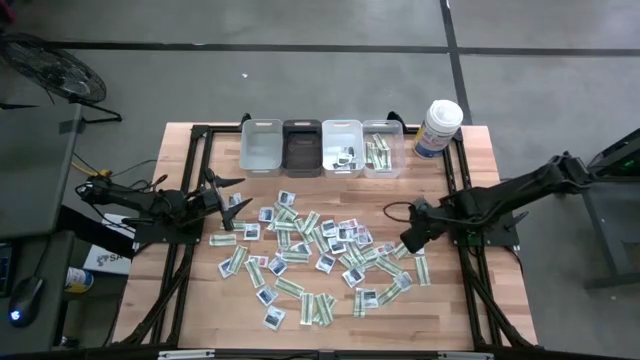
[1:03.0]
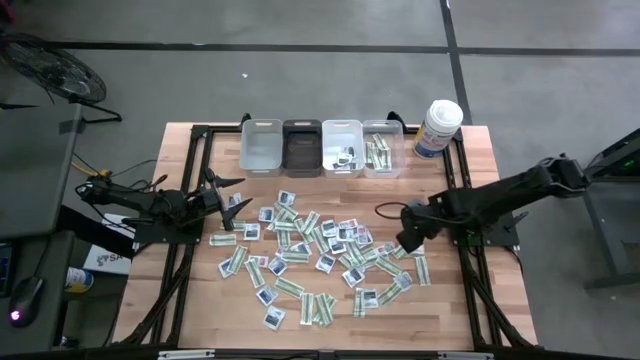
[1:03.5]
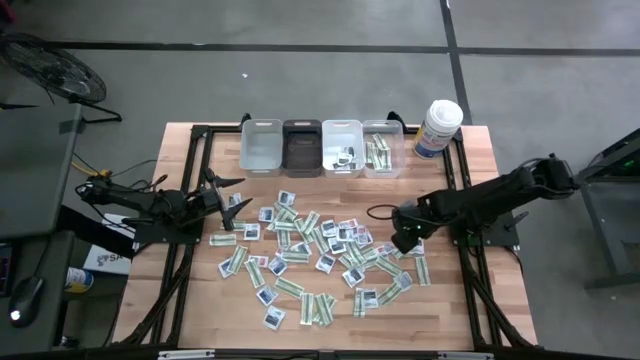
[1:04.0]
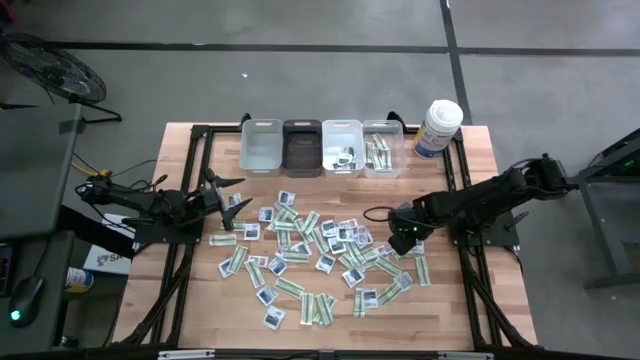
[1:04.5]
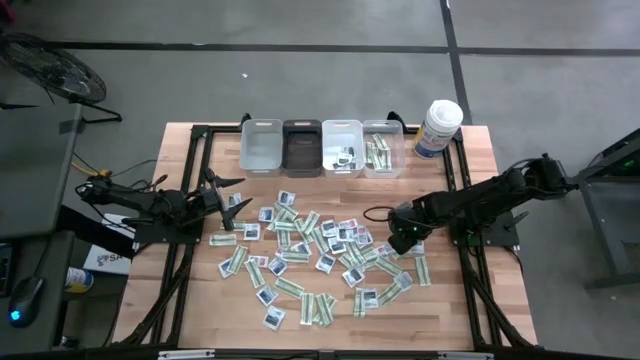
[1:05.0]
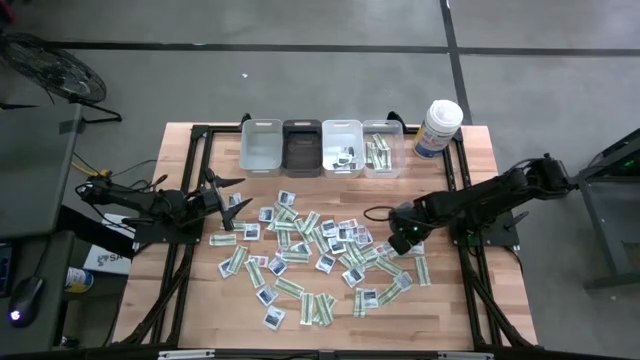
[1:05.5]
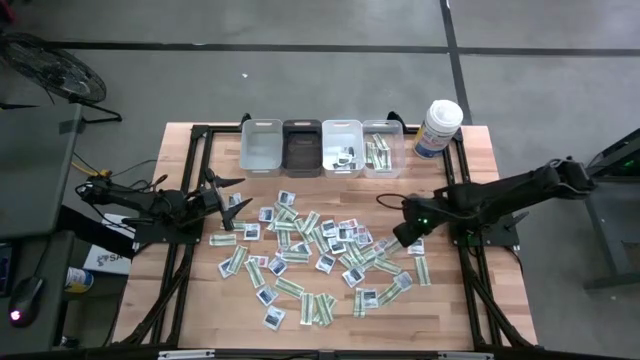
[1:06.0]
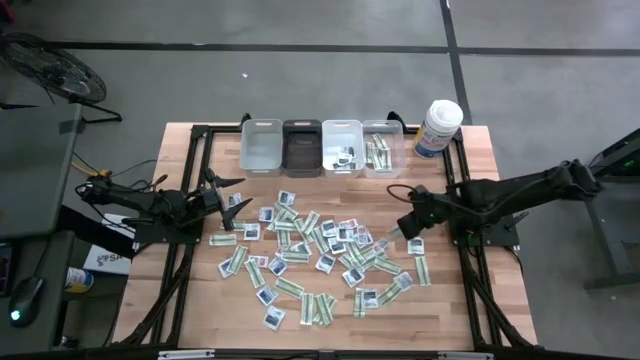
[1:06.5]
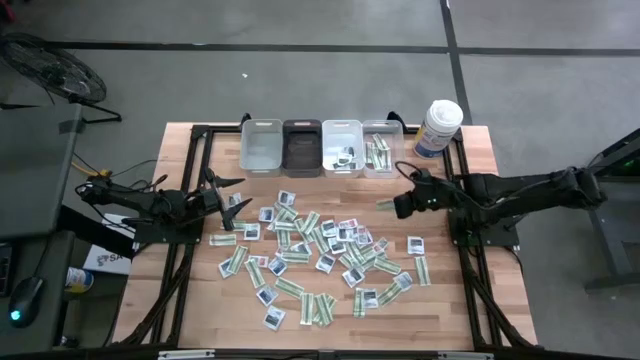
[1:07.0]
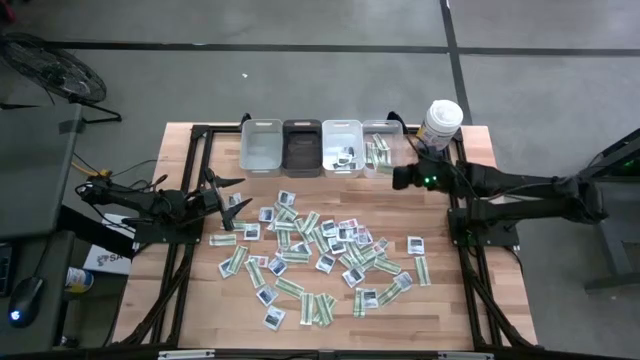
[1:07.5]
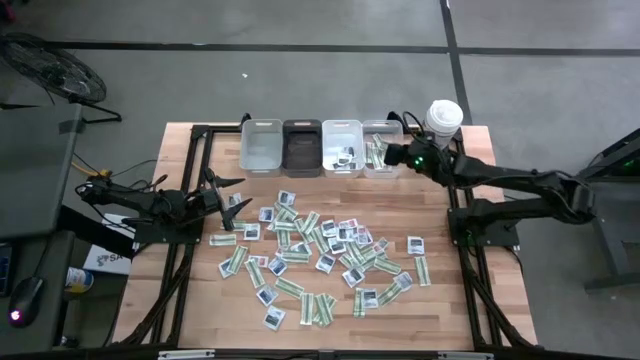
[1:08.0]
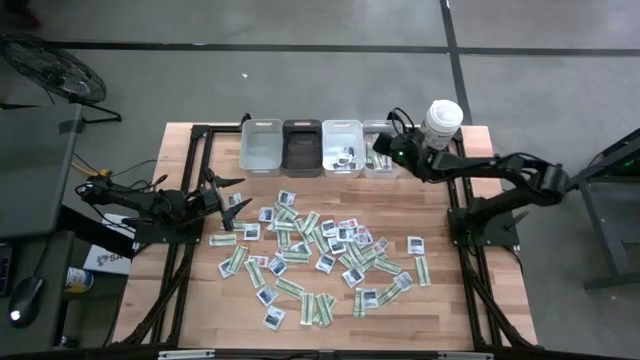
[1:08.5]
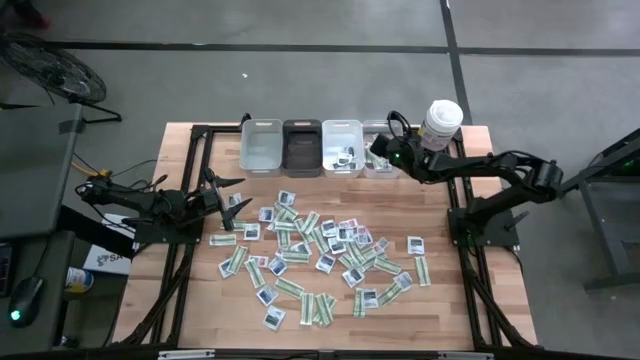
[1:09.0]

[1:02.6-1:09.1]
Task: Pick & Place First Aid Supplies
Put the green bandage into the transparent bin

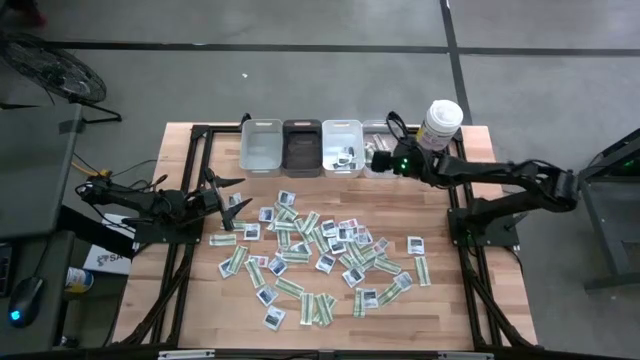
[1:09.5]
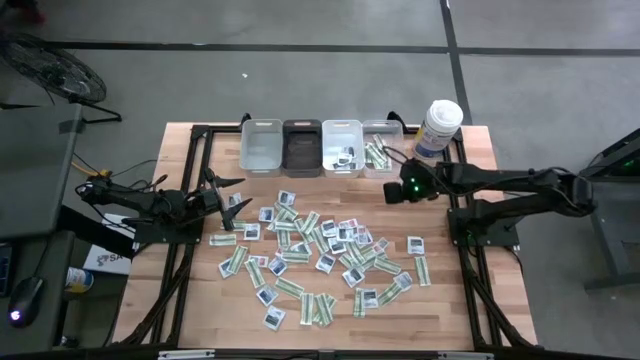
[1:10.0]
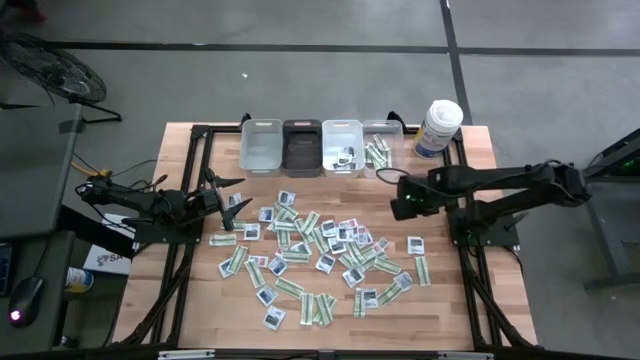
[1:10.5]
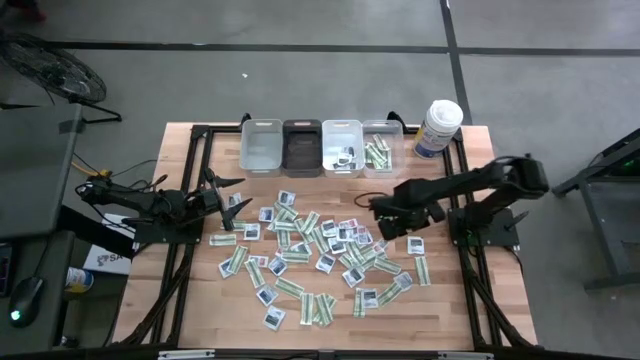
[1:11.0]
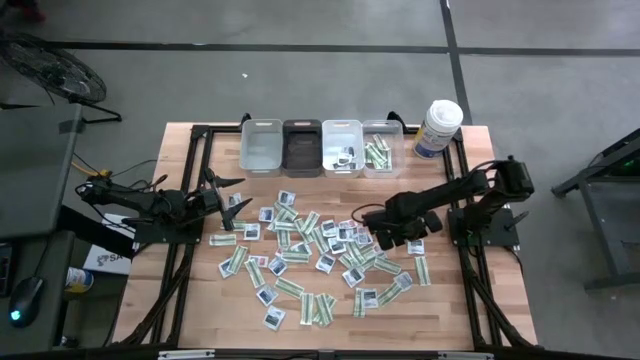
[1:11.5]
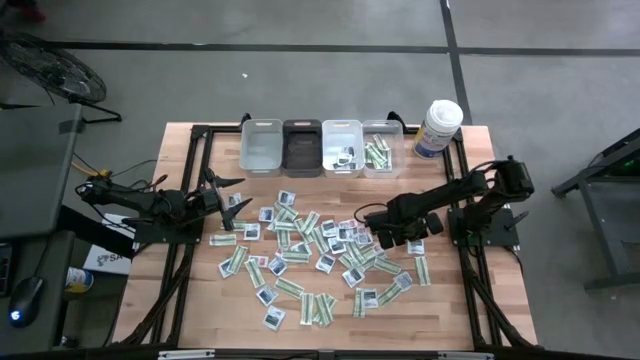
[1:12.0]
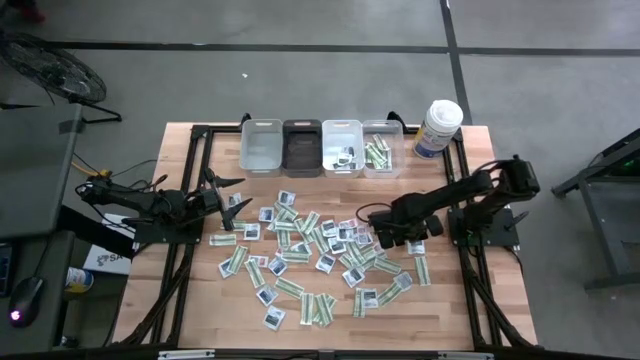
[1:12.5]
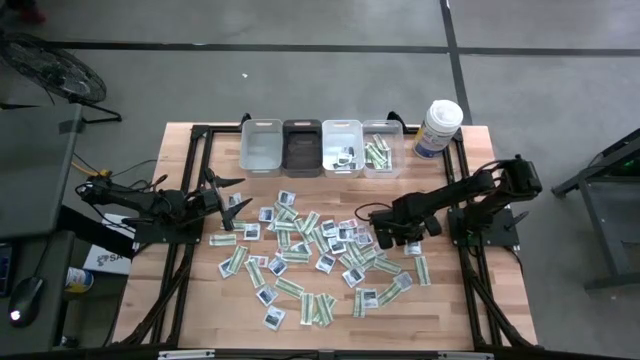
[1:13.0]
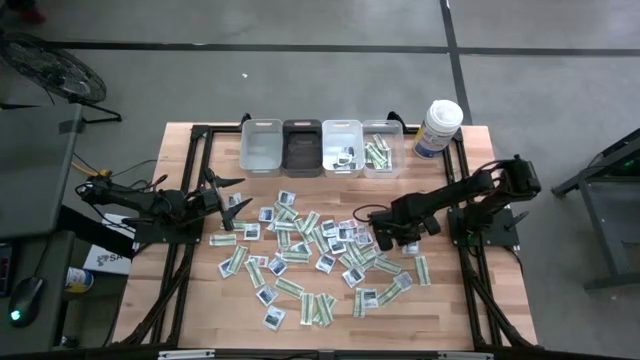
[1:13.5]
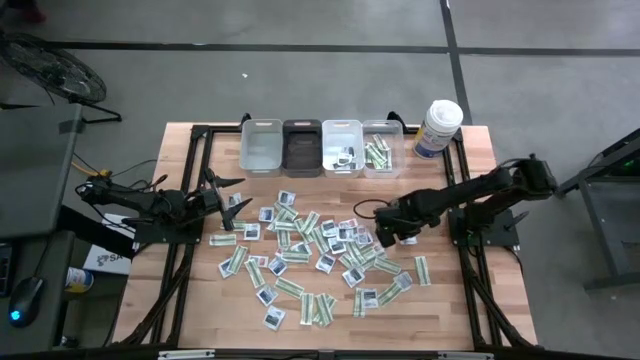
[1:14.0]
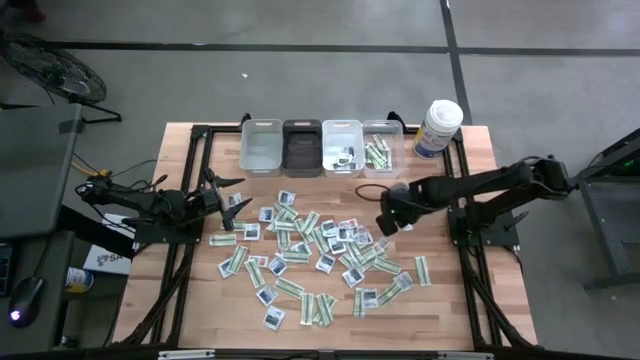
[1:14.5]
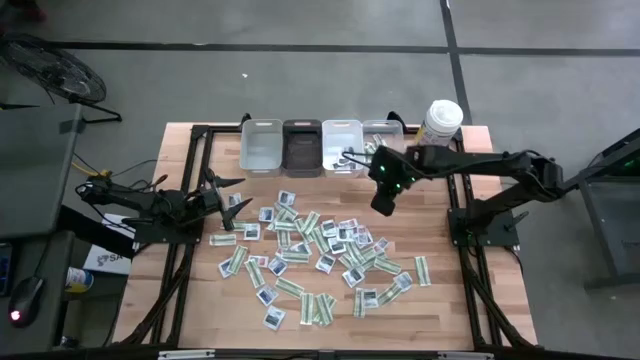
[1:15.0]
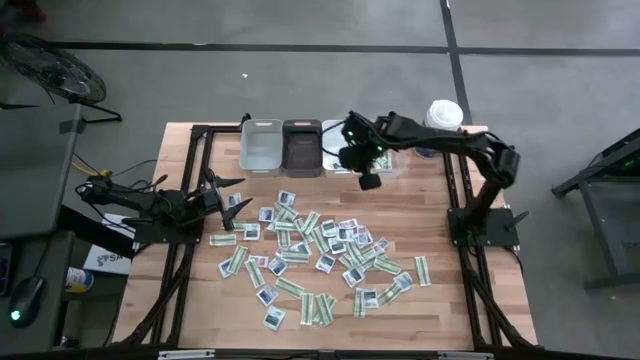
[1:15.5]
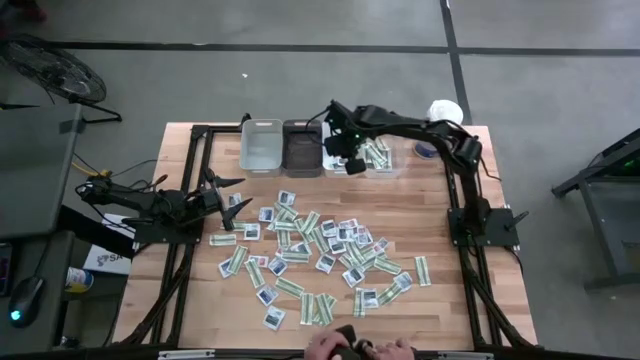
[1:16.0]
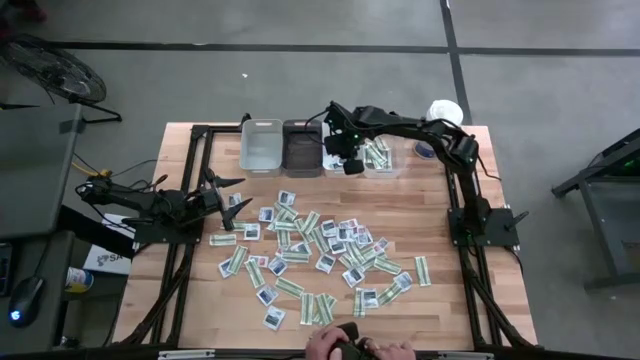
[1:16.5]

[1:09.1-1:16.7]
Put the black towelette pack into the white bin

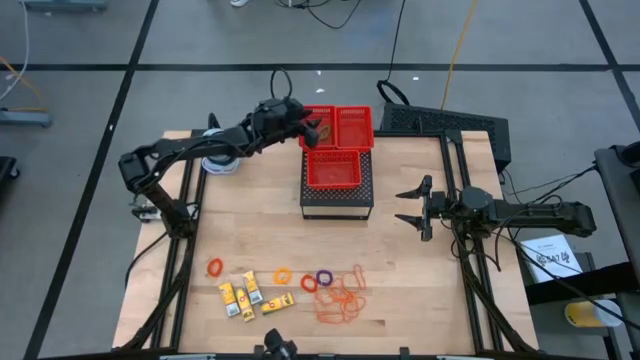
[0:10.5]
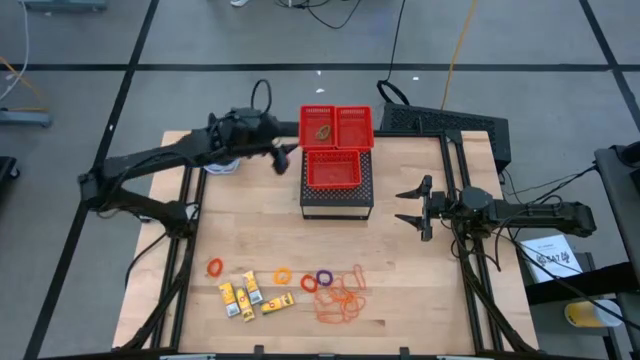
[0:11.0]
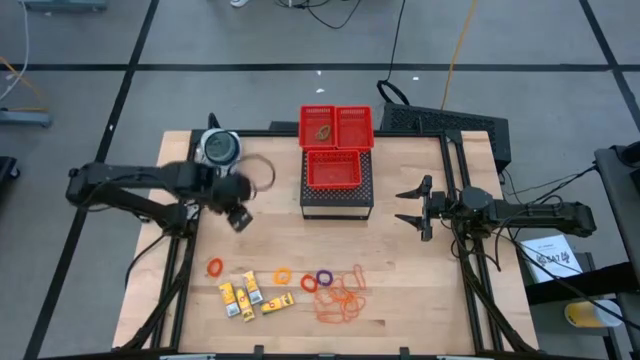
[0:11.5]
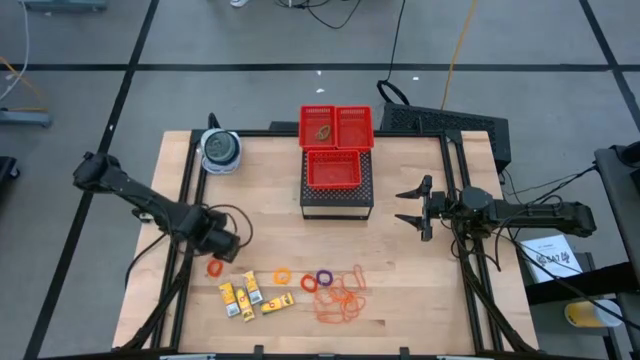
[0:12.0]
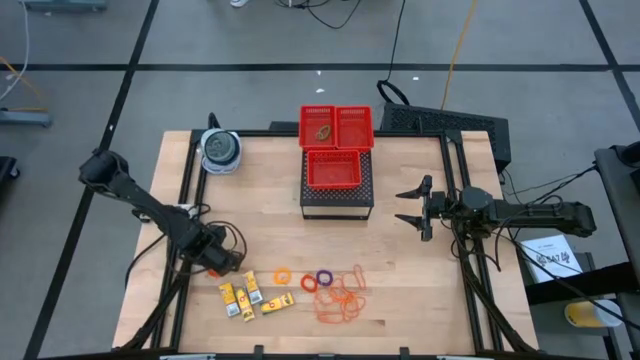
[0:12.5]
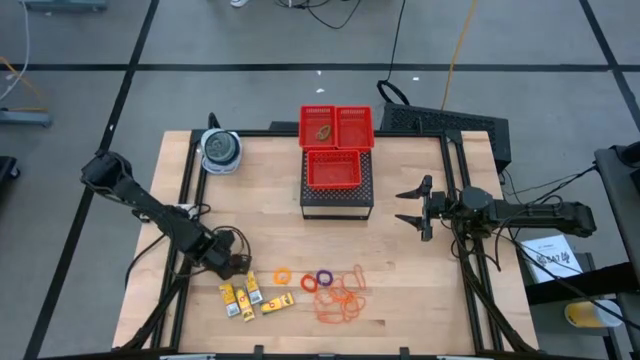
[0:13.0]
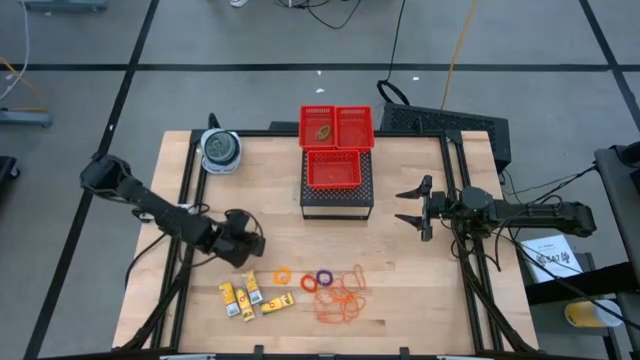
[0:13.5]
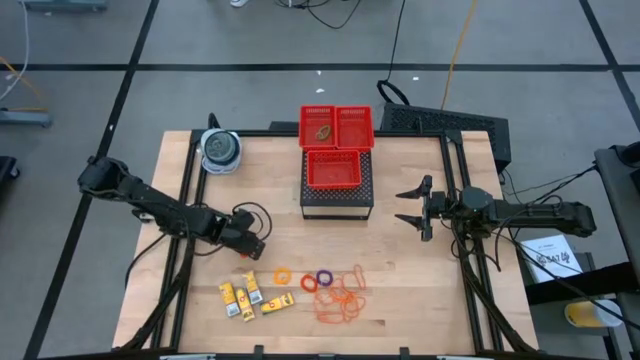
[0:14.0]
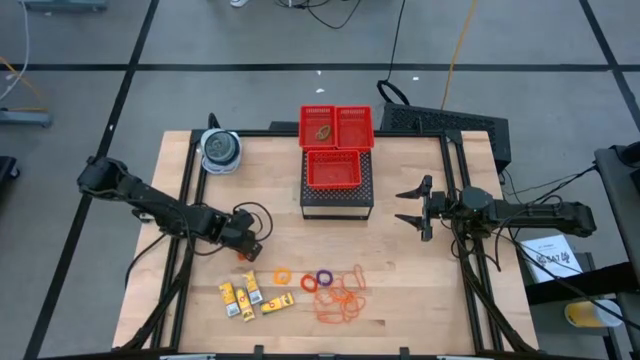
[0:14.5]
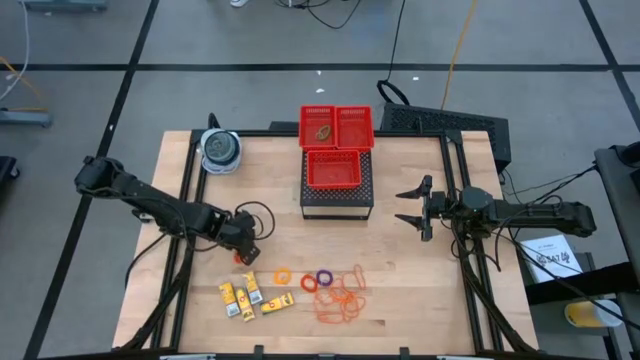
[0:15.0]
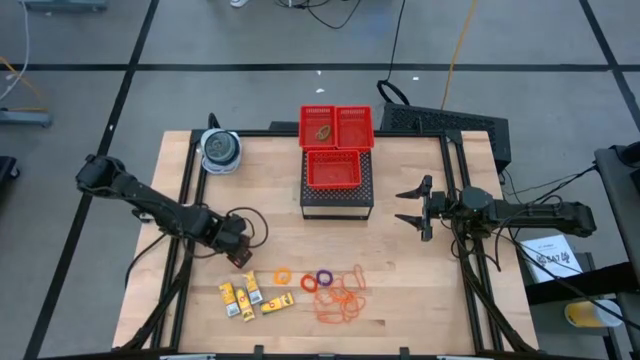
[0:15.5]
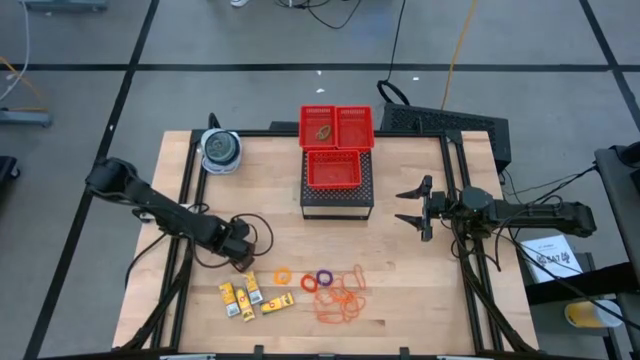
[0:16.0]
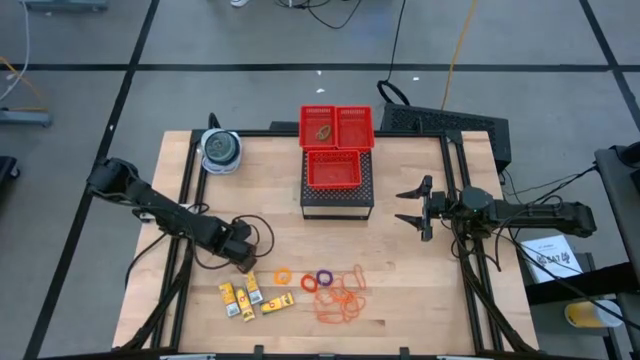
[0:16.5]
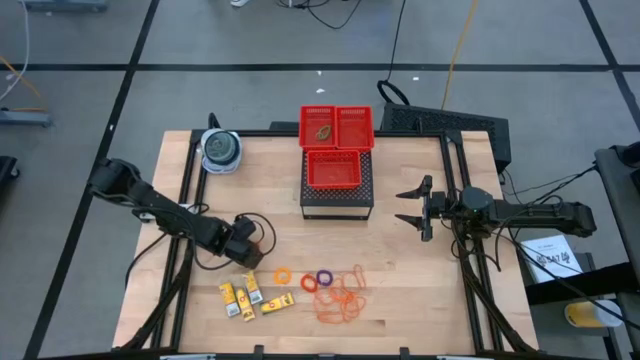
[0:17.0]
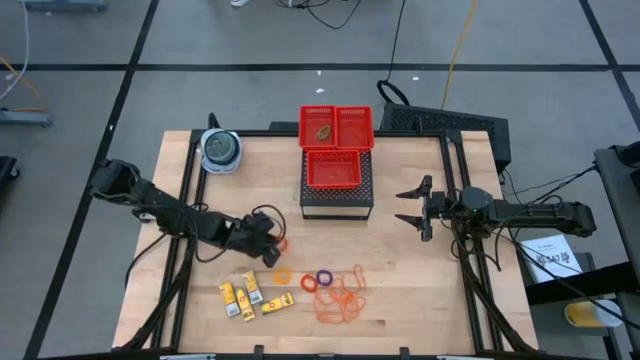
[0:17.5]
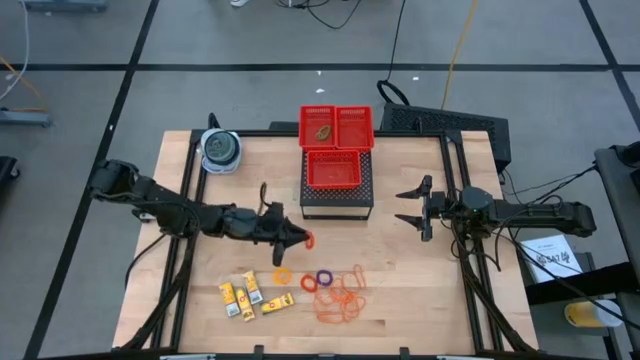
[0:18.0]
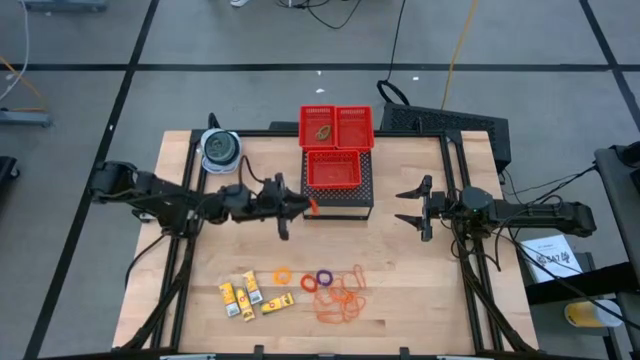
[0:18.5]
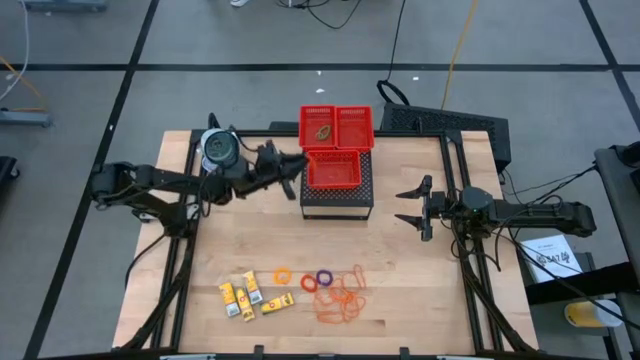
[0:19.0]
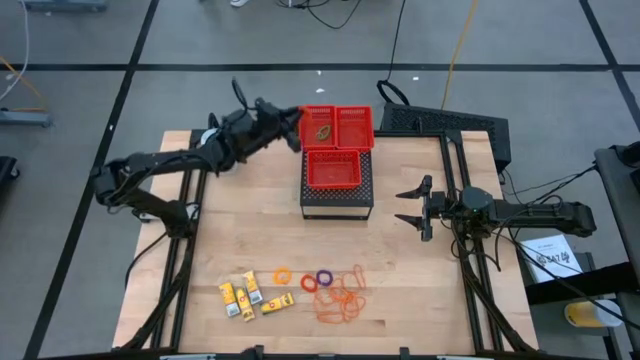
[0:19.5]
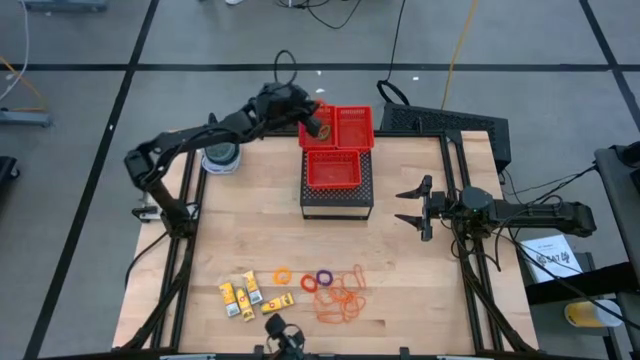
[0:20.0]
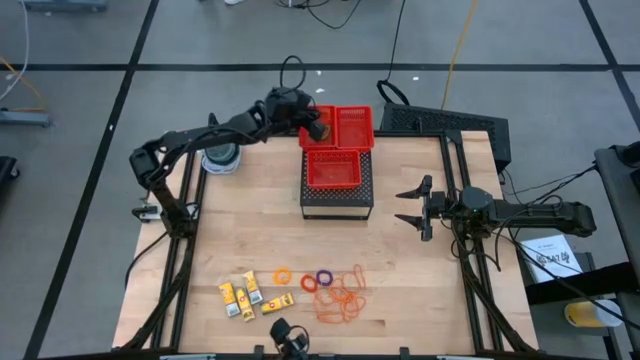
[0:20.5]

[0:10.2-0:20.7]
Task: Pick & Place Office Desk Supplies
Put the orange spring keychain in the top left red bin on the shelf
